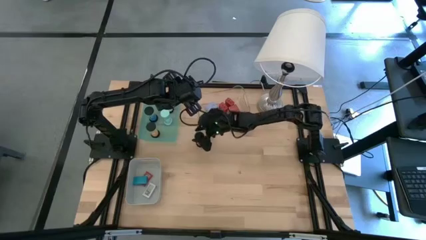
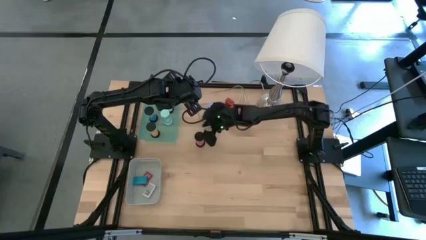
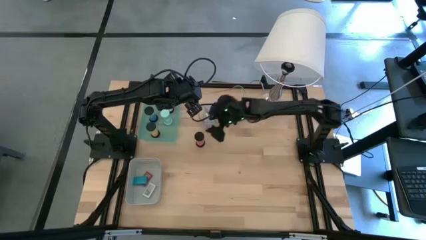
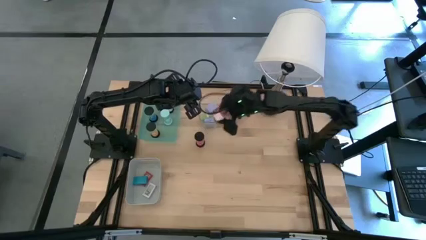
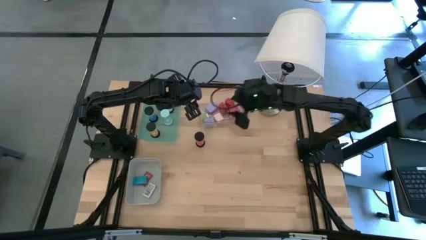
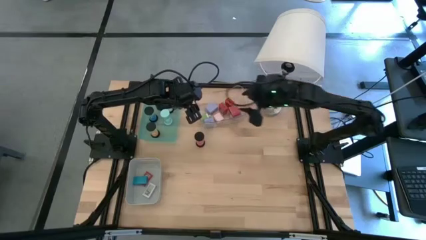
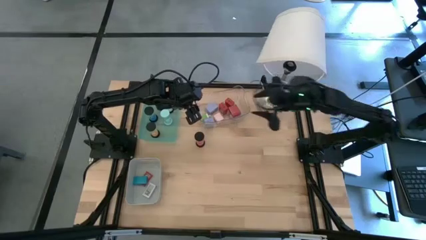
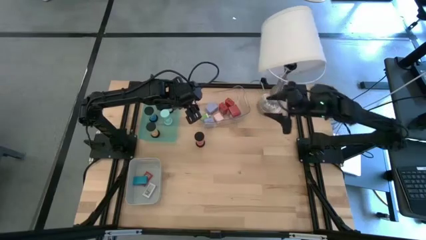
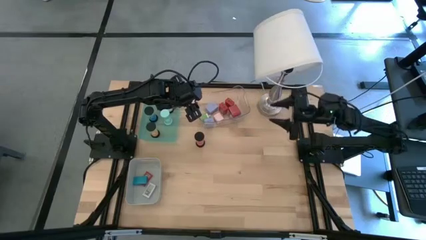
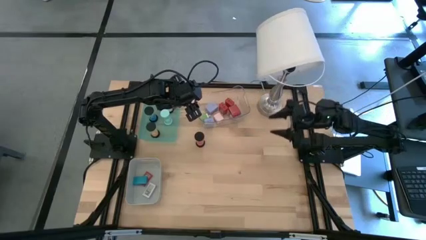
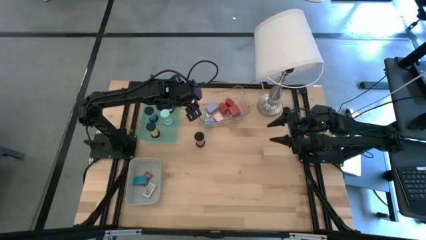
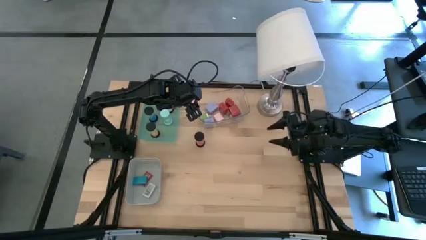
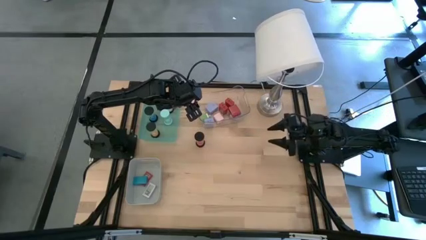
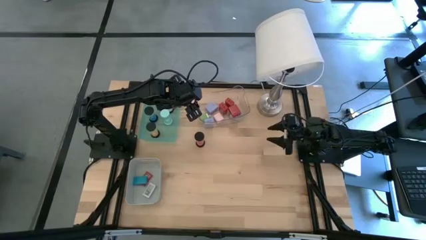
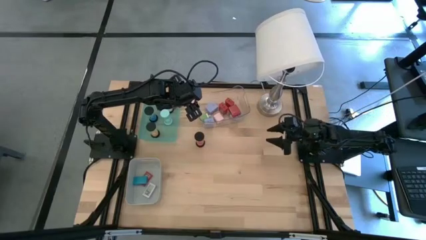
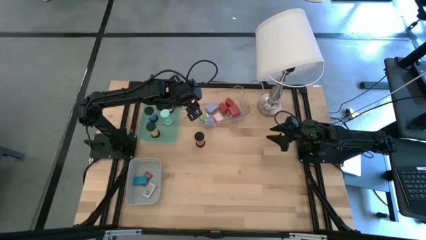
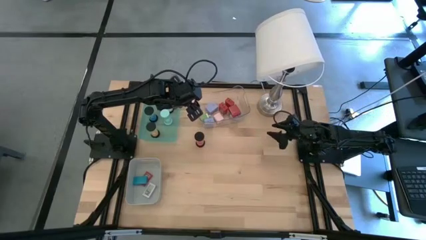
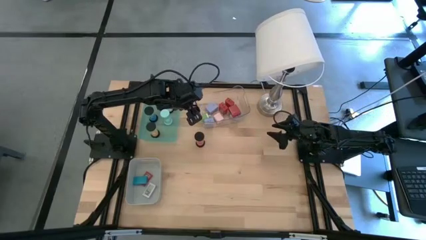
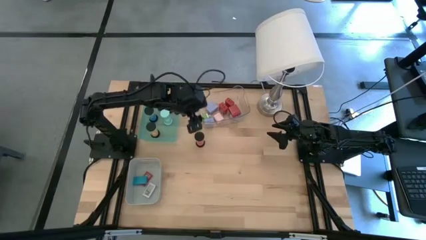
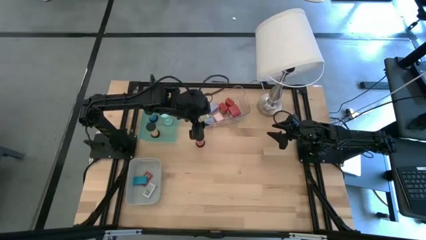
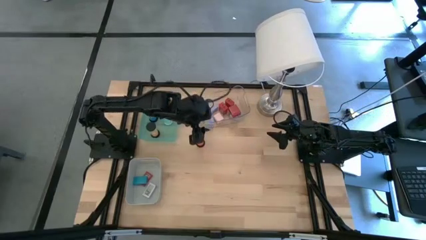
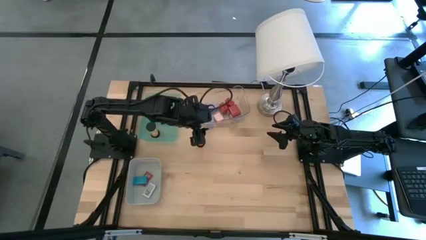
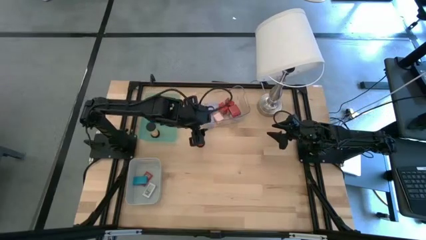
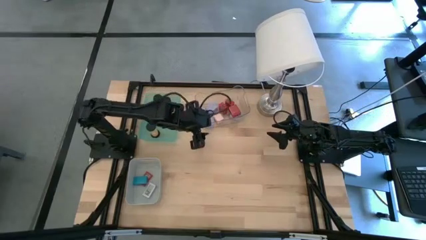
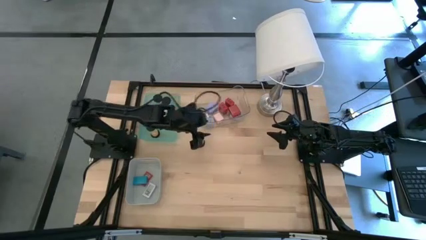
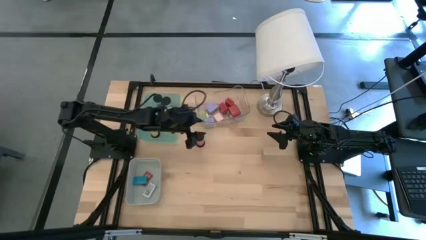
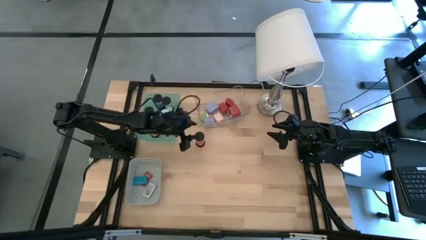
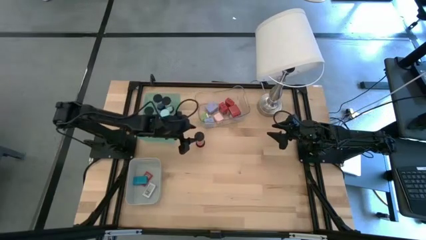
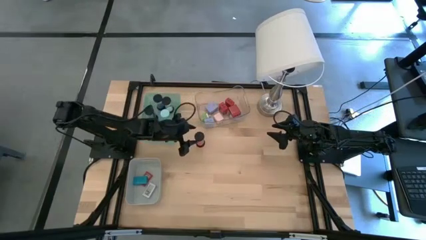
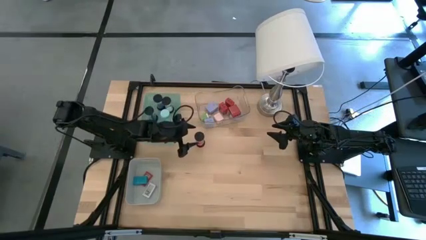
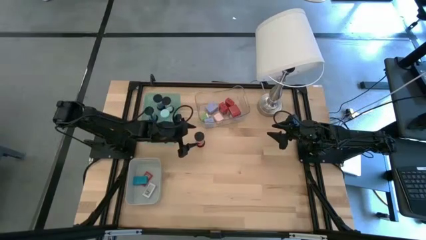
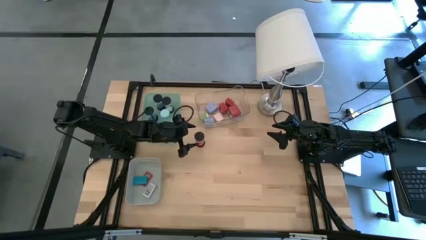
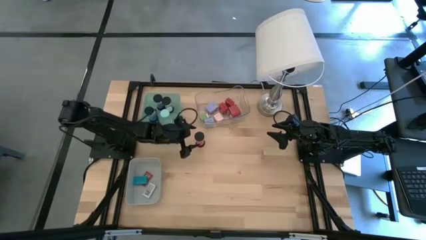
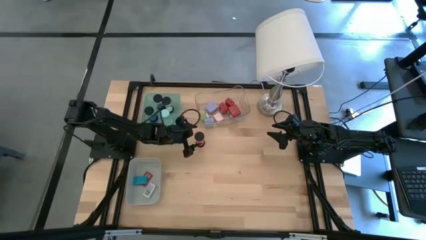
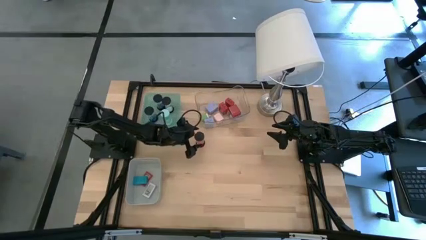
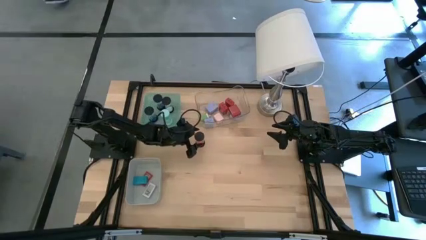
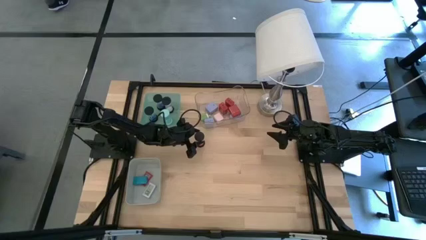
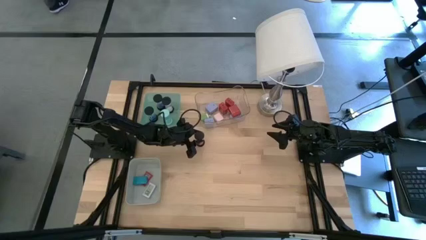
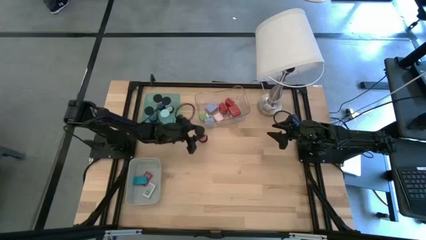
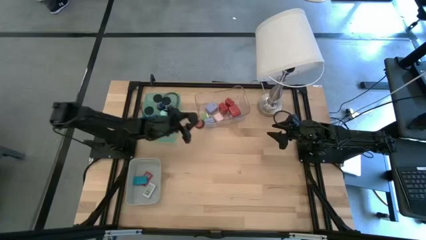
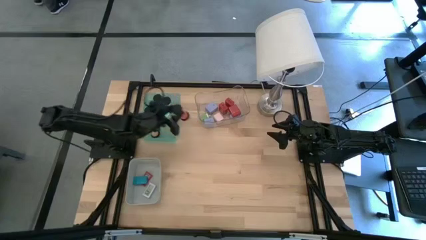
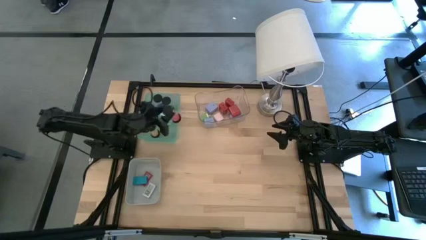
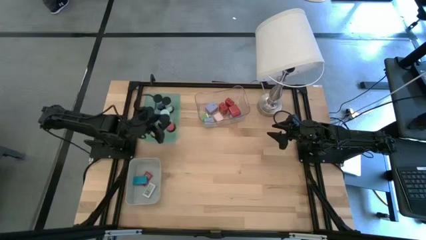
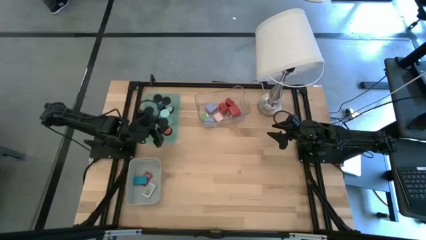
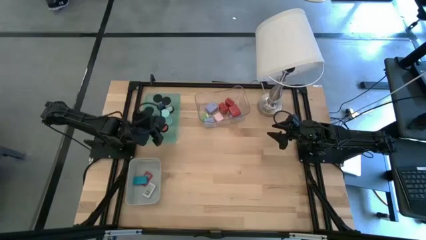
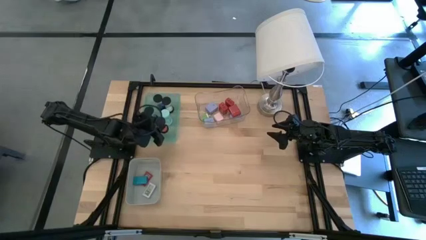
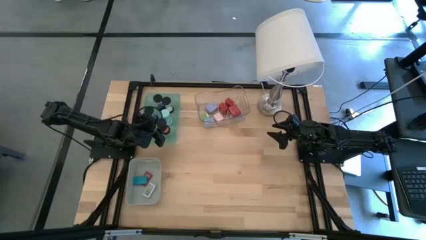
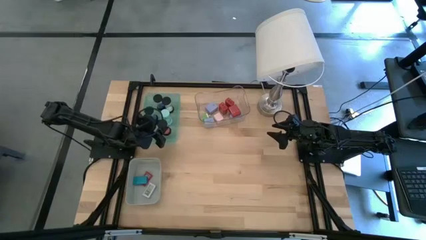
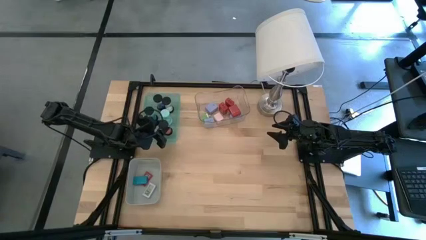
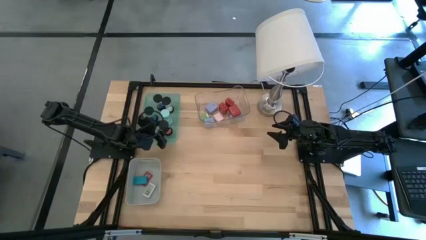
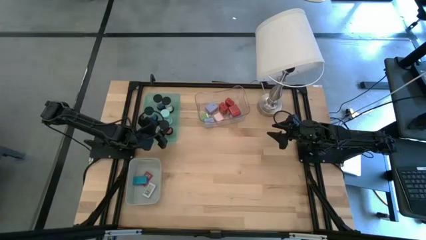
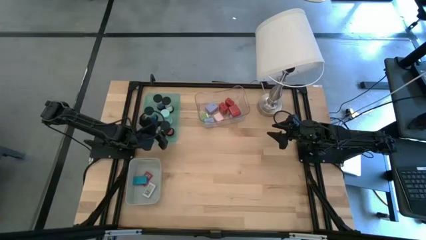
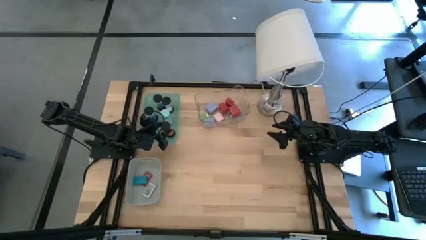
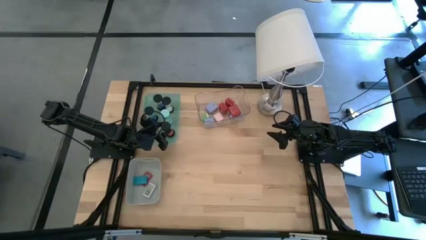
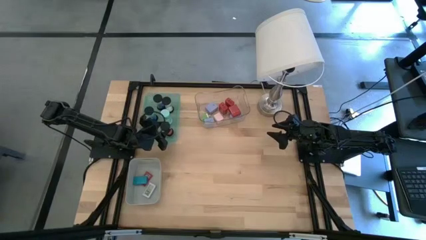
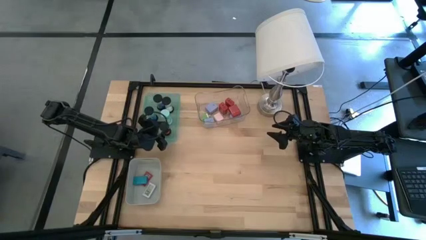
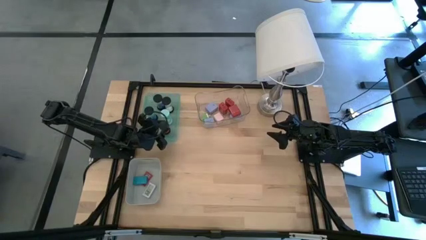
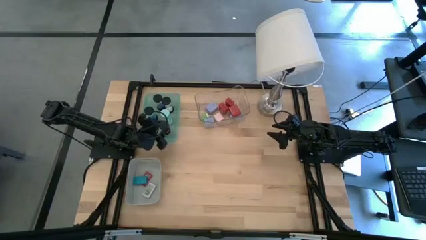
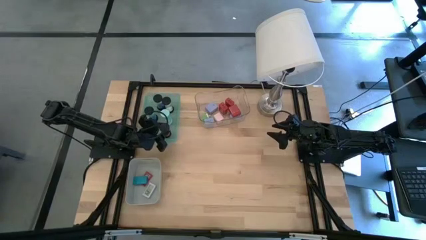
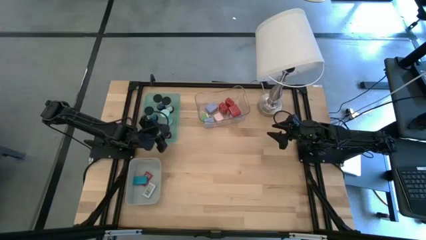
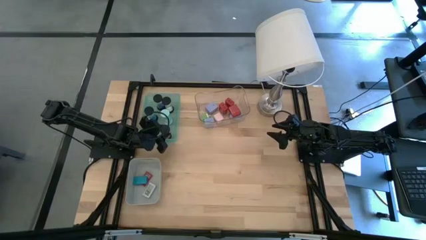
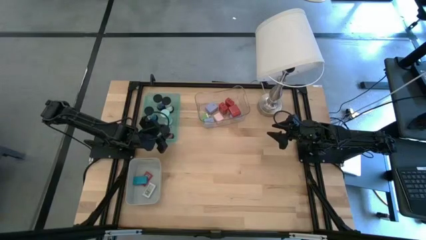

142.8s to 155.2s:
Task: Pick & Place Office items
Put the red hourglass into the green bin

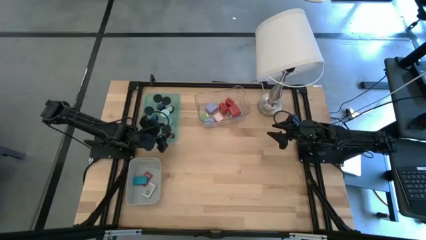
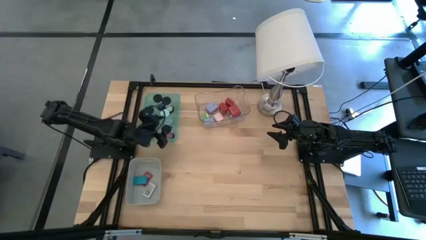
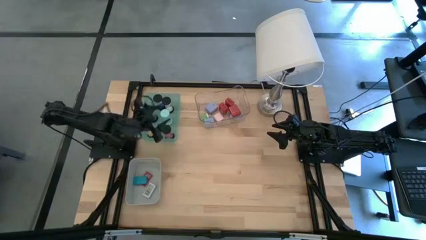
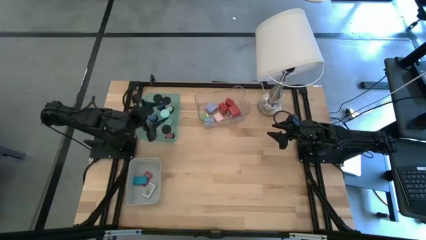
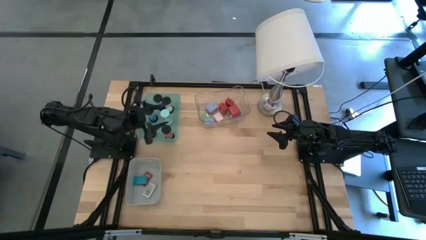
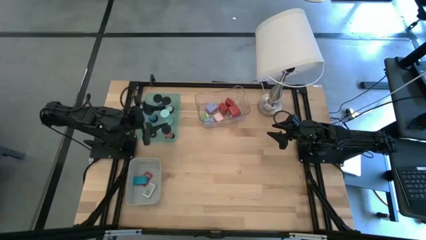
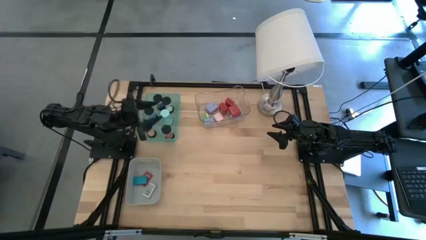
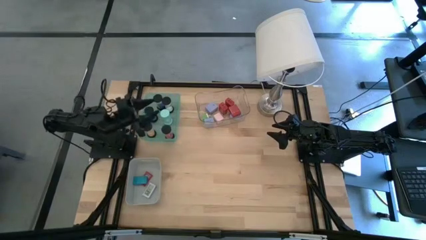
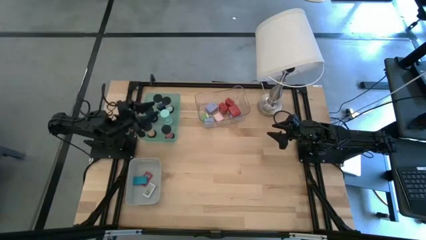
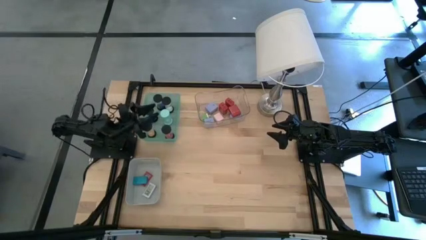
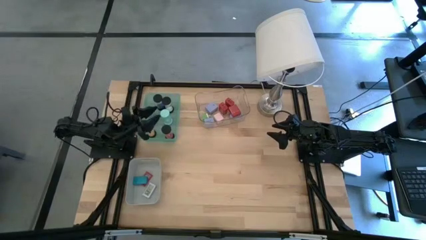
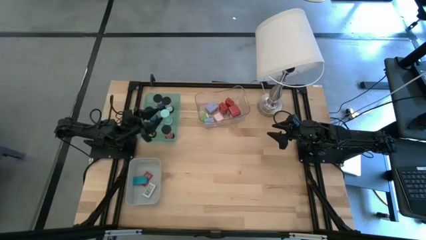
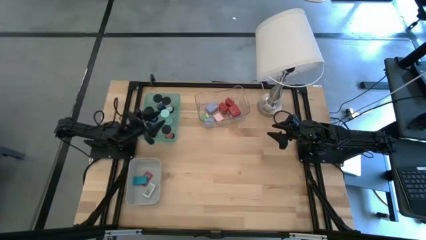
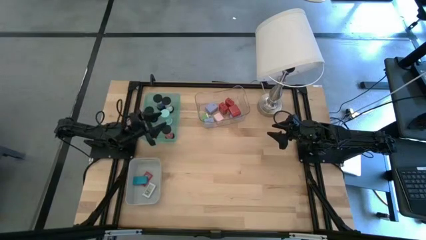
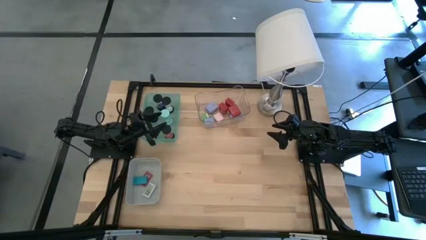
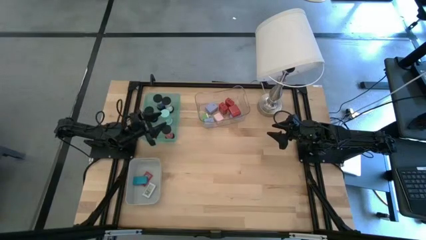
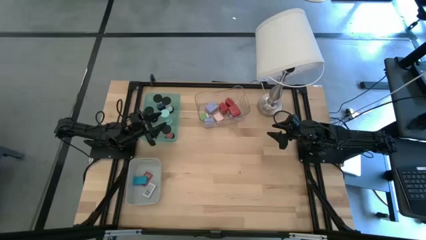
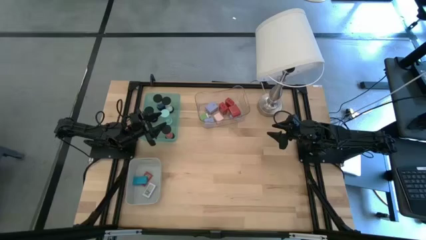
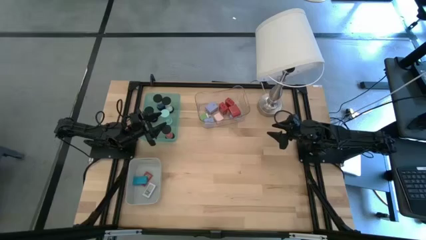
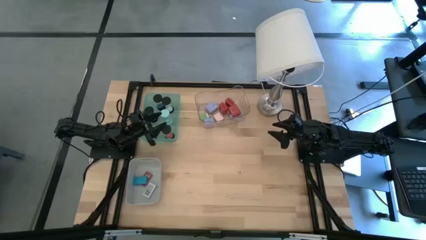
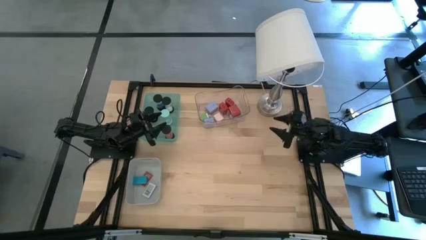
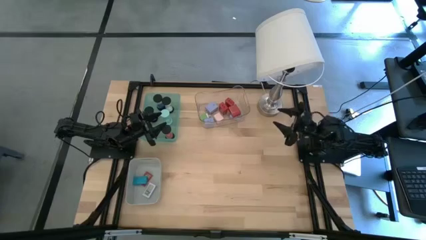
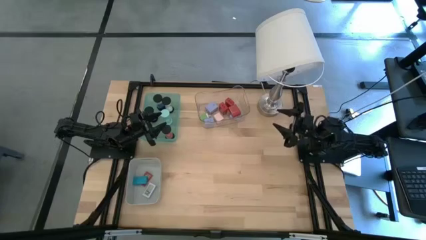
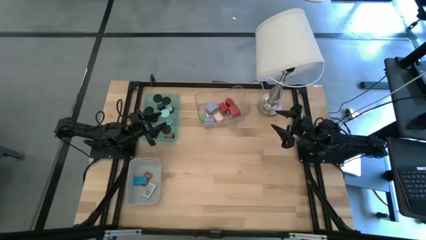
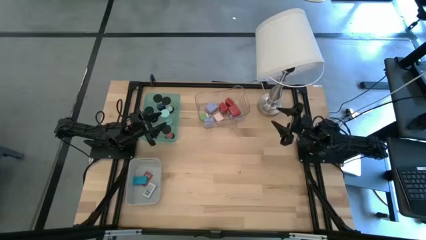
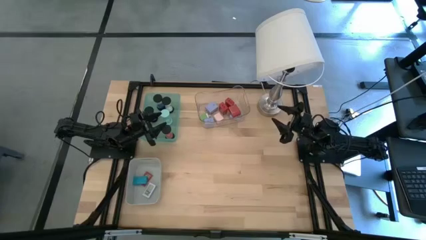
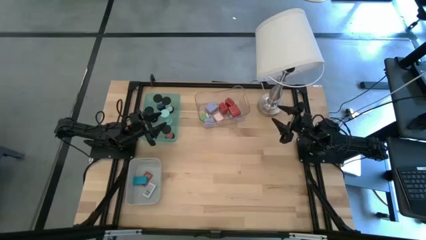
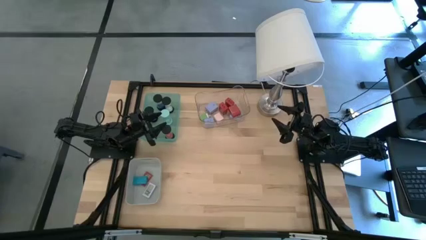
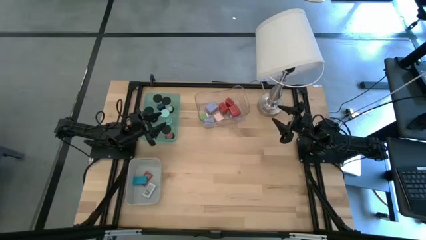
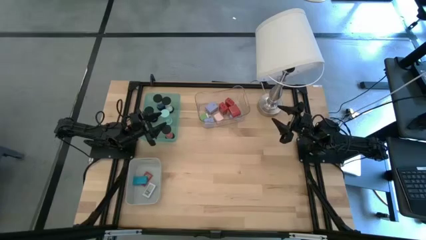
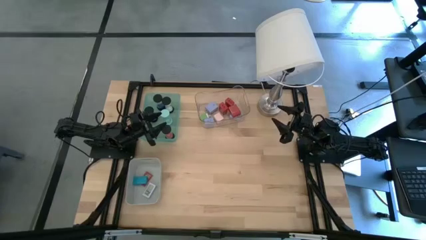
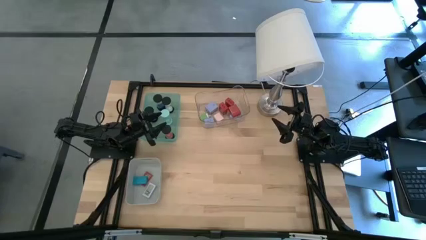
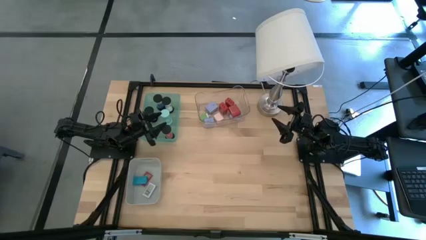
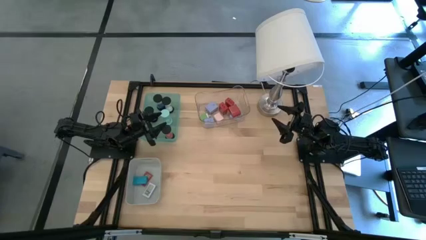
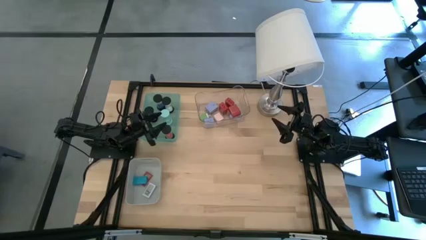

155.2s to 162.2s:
Return to Home Position
